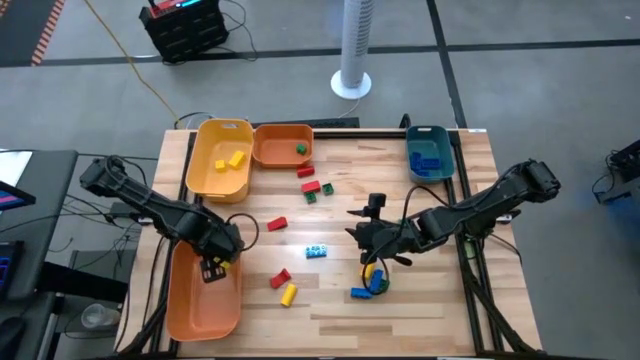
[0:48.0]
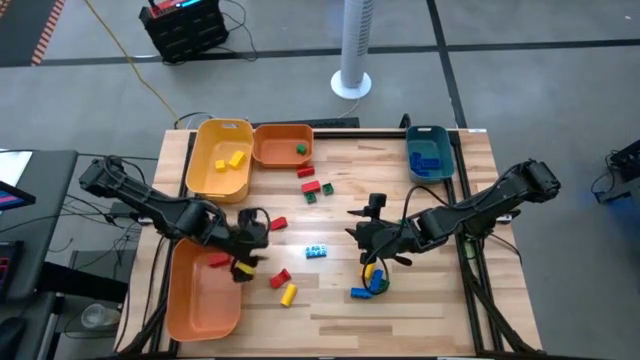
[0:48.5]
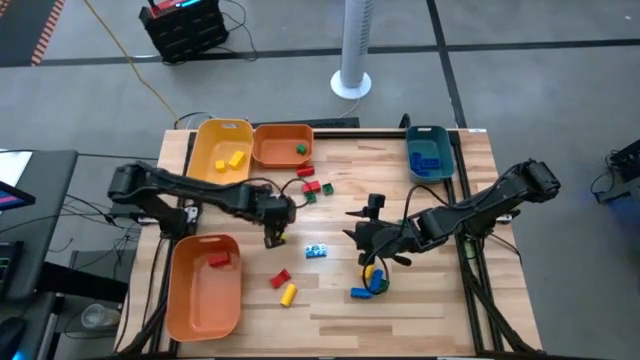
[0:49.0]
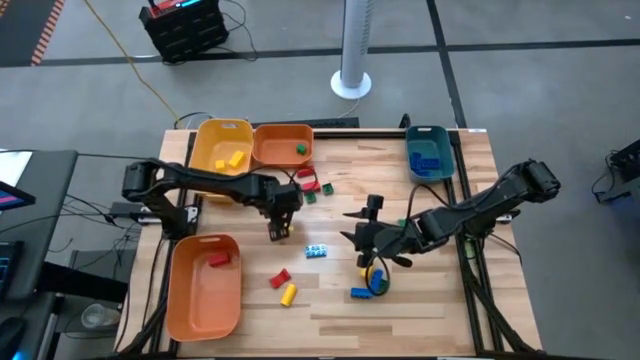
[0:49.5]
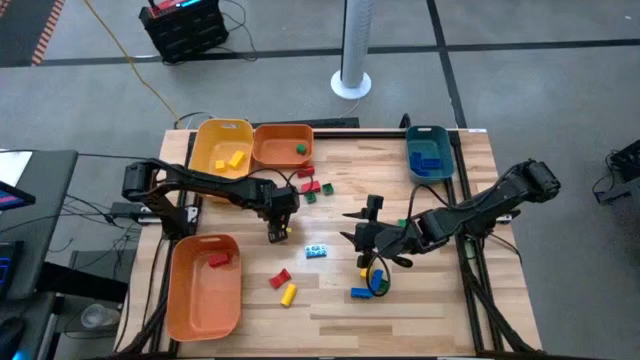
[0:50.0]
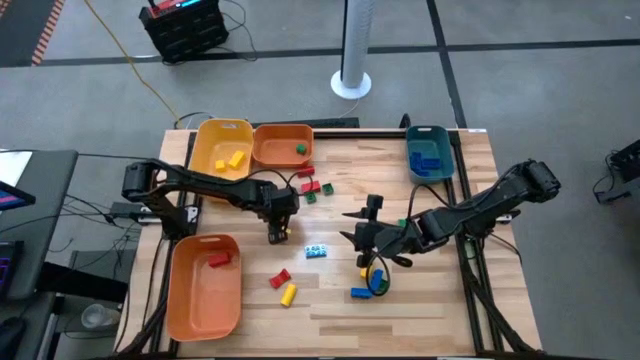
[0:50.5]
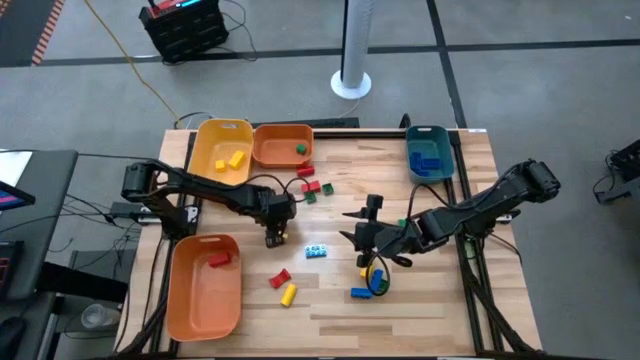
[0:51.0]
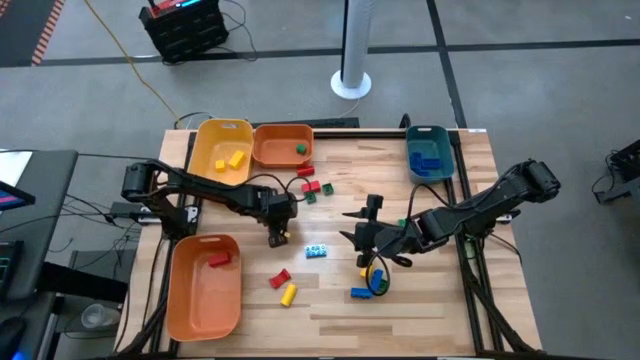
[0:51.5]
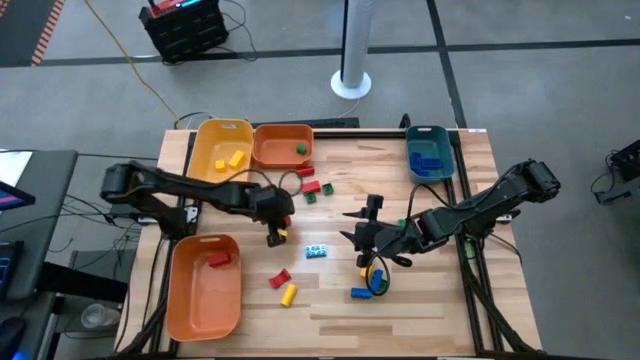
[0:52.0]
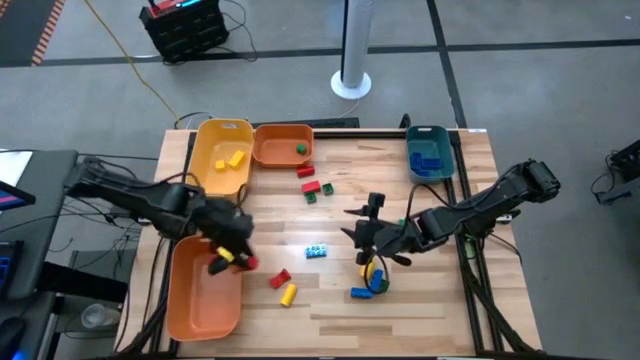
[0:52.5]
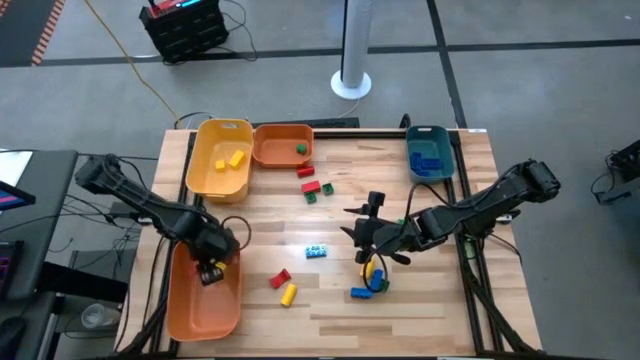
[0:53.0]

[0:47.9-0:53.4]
Task: Sort blocks
Put the red wooden block into the bottom orange bin

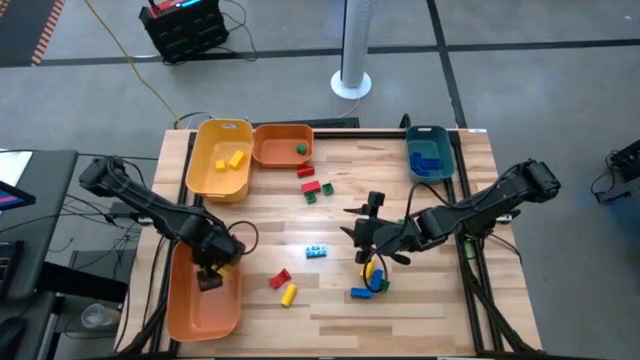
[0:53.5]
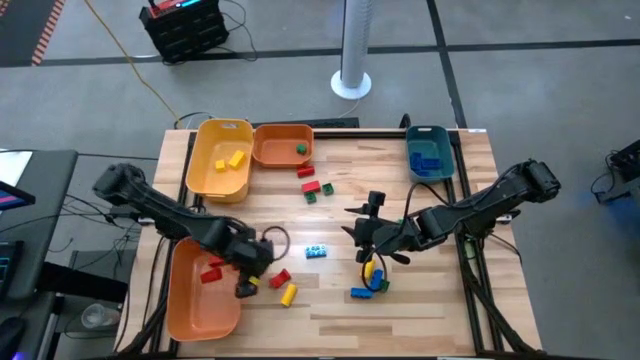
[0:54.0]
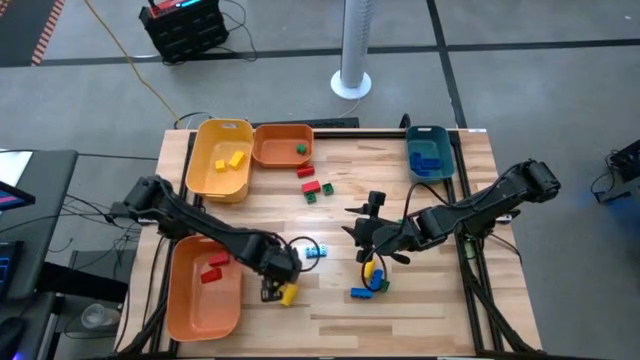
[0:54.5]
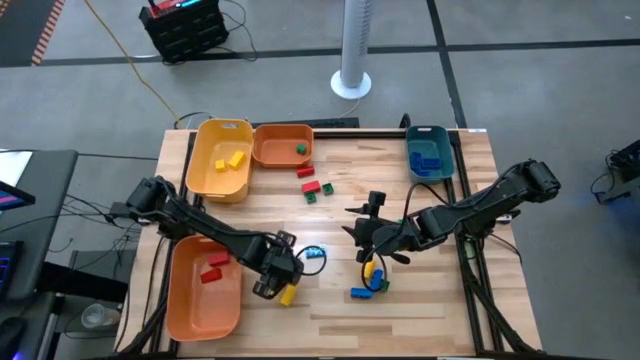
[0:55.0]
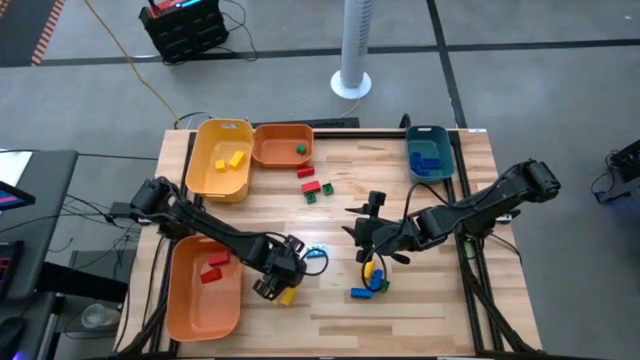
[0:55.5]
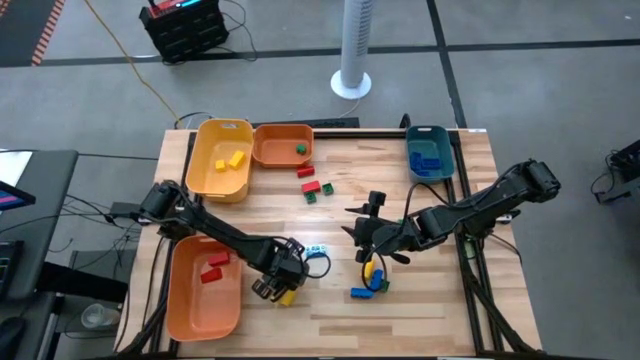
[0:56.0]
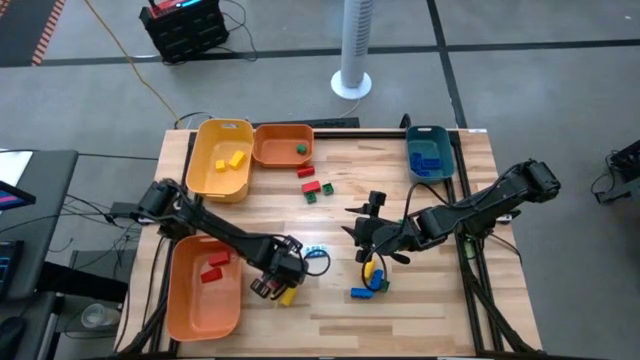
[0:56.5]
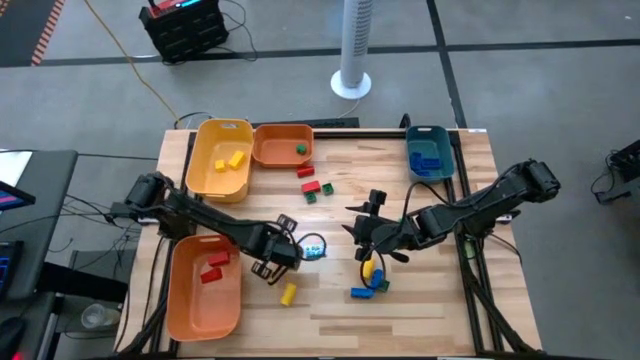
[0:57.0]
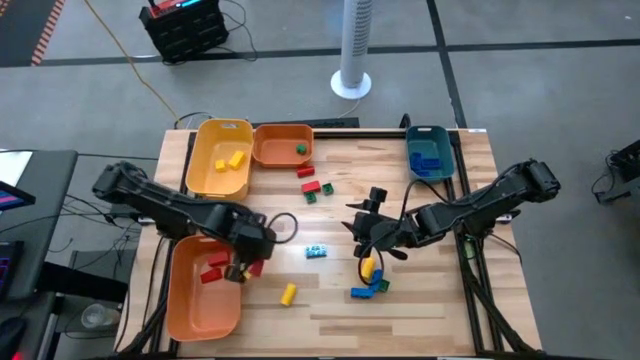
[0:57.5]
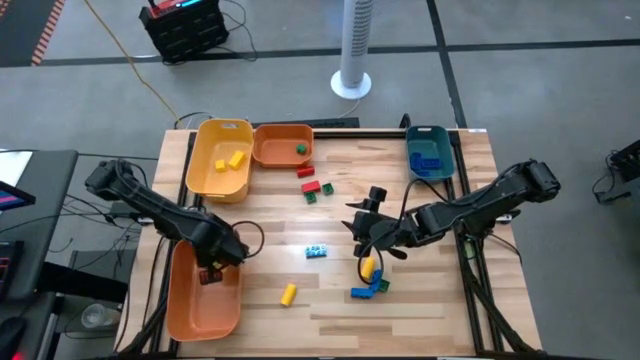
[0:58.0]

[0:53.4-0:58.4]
Put the red wooden block into the bottom orange bin

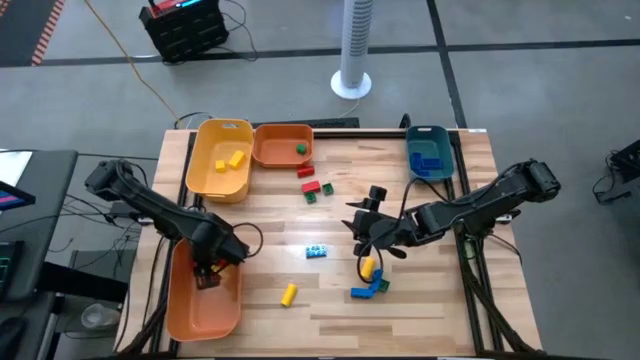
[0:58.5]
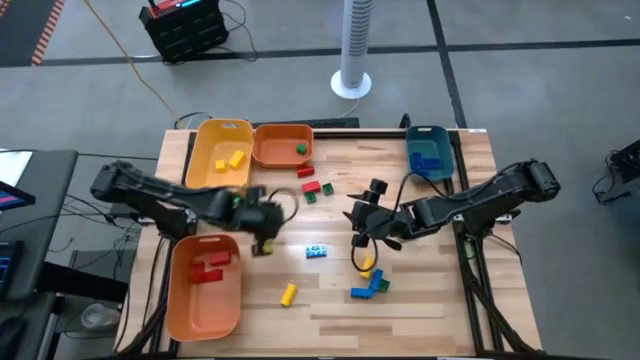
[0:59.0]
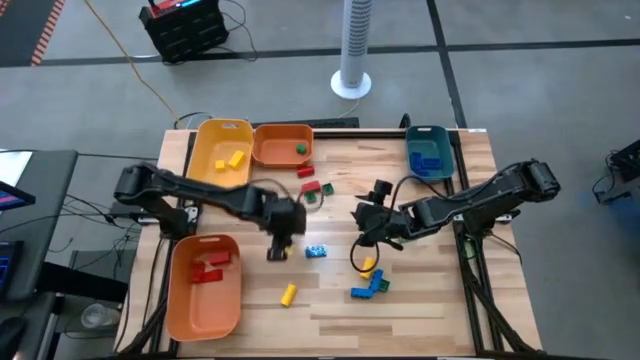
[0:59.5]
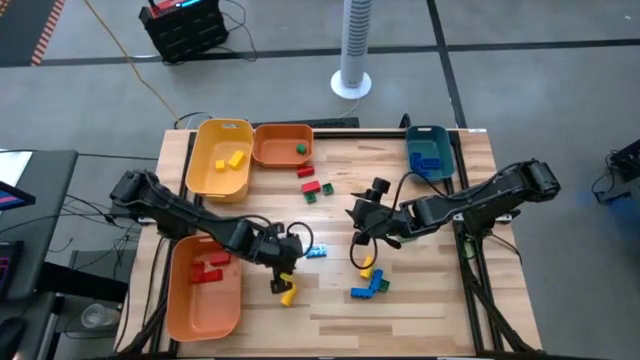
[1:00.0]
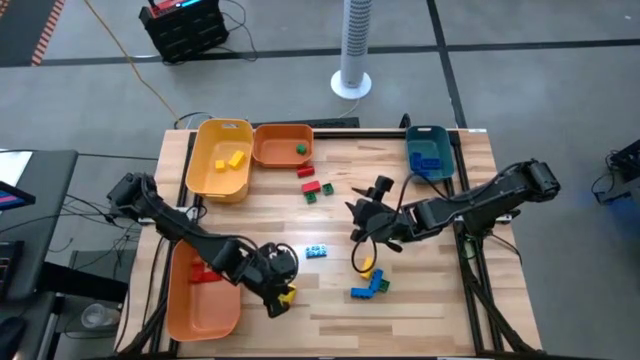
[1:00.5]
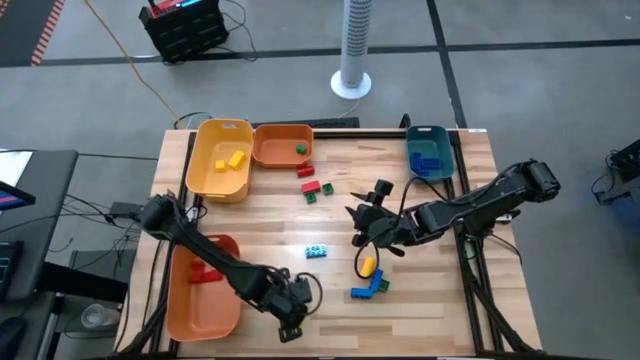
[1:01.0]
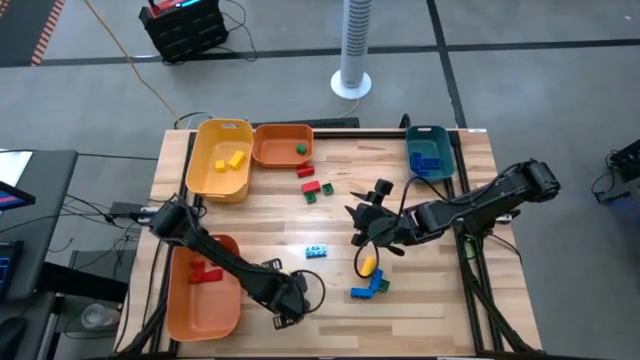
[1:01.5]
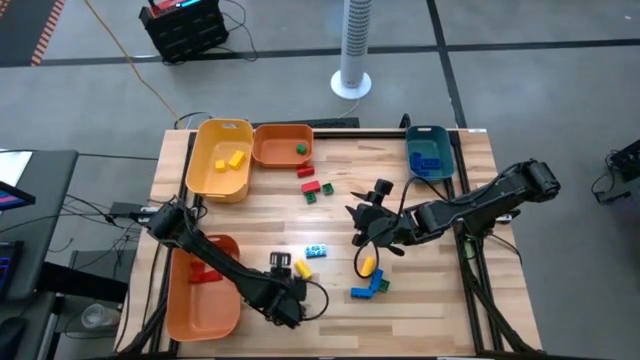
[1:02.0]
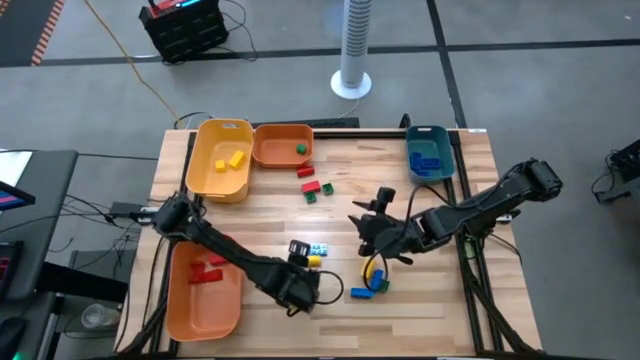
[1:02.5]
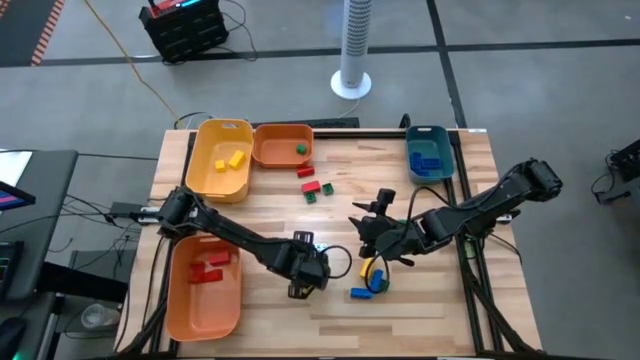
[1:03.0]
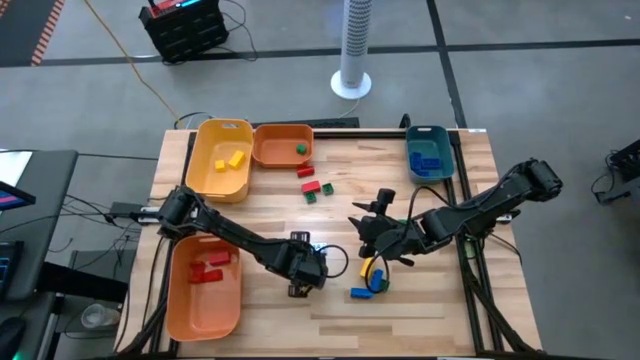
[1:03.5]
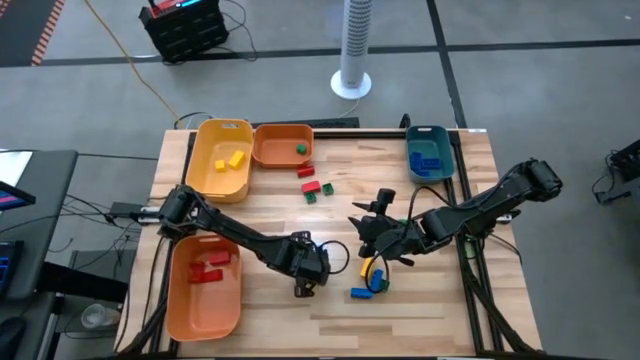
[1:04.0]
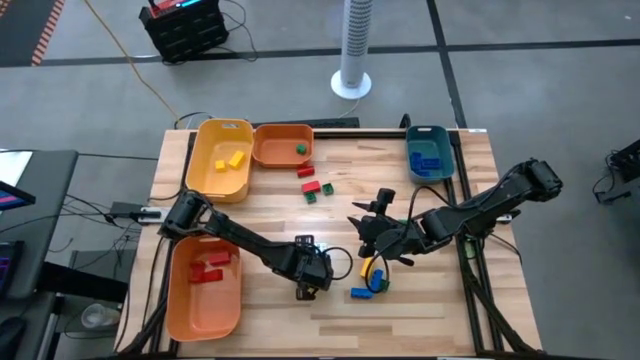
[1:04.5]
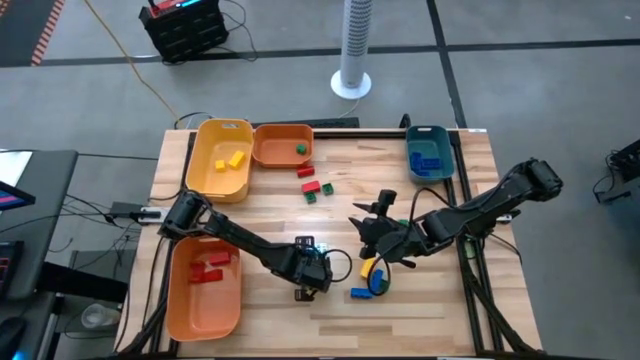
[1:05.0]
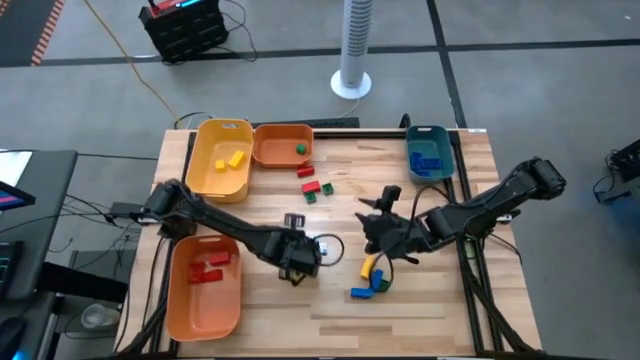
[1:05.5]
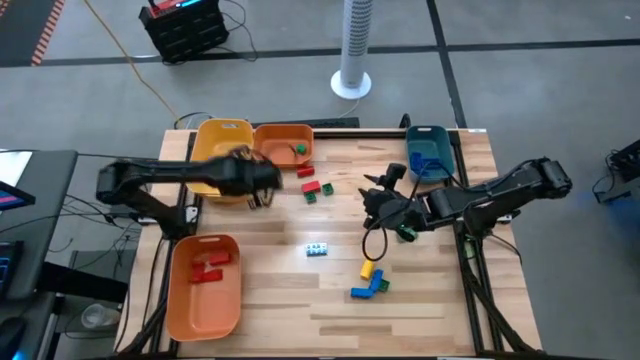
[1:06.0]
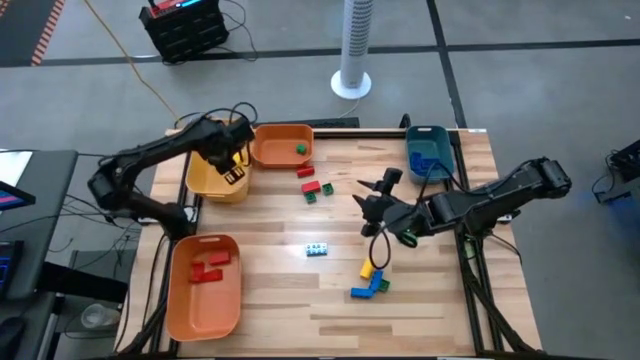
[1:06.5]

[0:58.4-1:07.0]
Put the yellow wooden block into the yellow bin

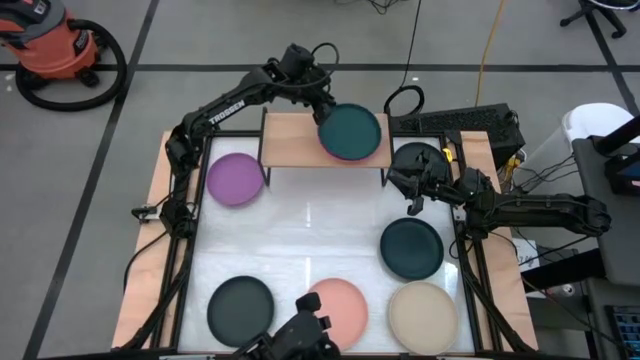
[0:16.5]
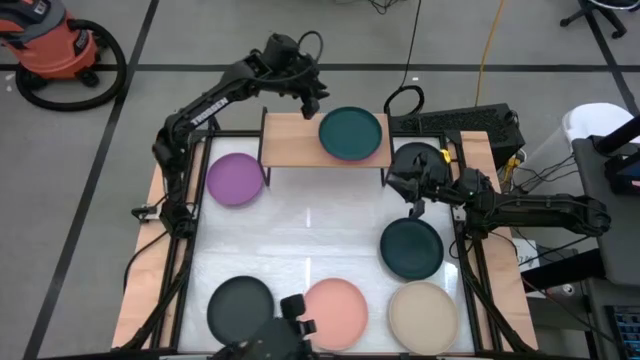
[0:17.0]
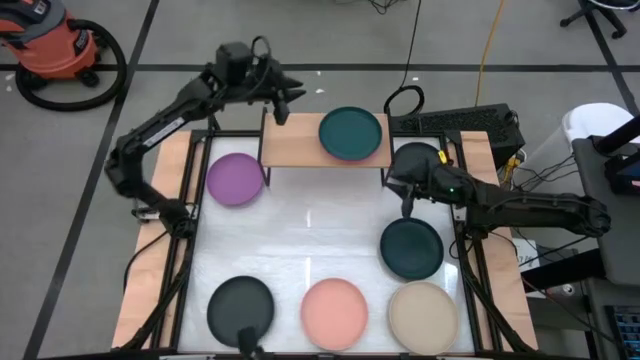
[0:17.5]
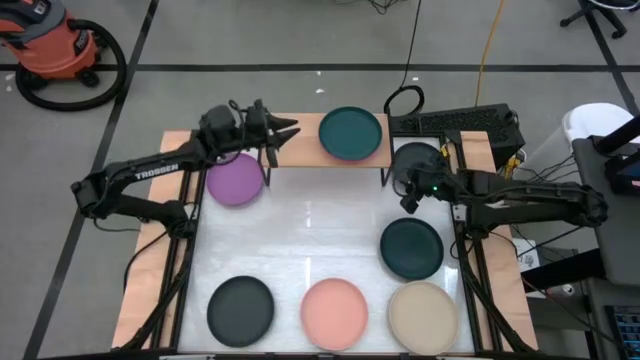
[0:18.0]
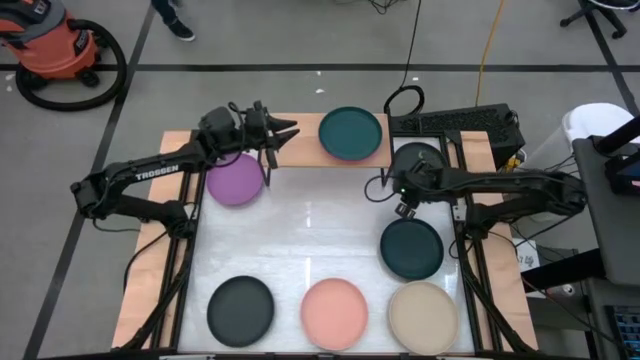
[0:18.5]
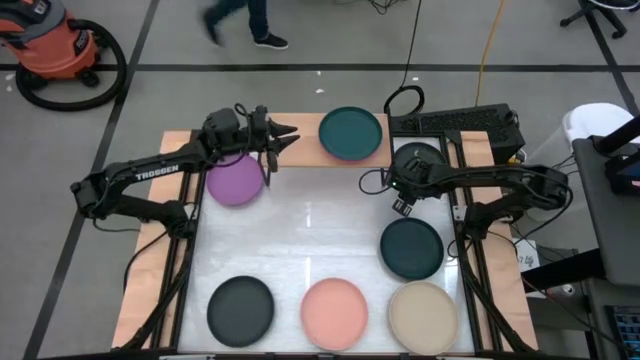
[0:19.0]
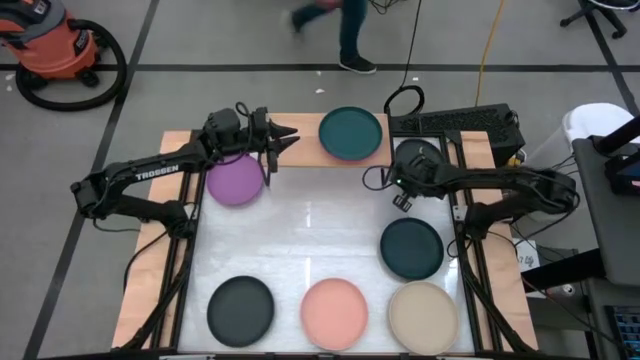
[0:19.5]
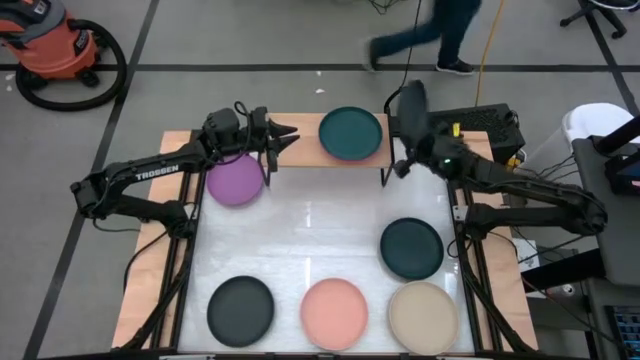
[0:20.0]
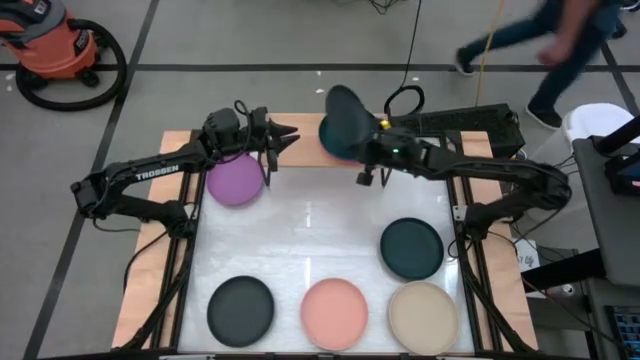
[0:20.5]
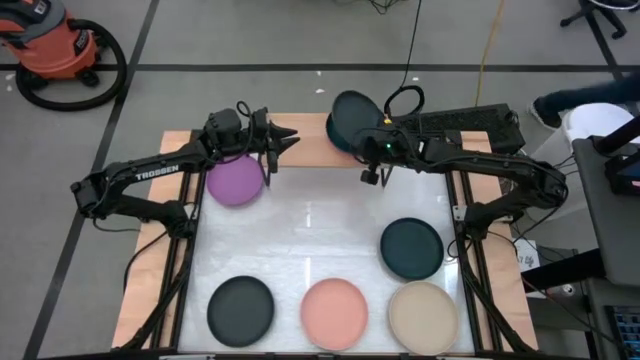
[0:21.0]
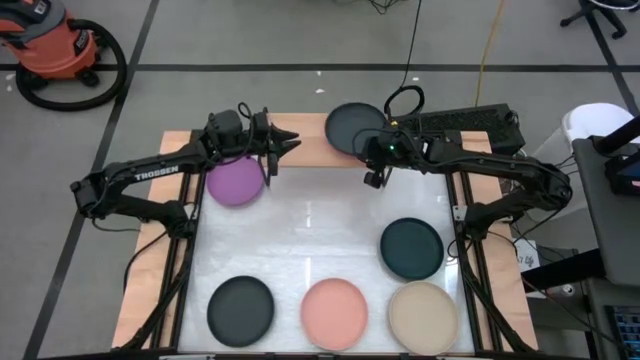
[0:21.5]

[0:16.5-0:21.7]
Task: Place and stack plates onto a shelf
Stack the top black plate on top of the dark green plate on the shelf
